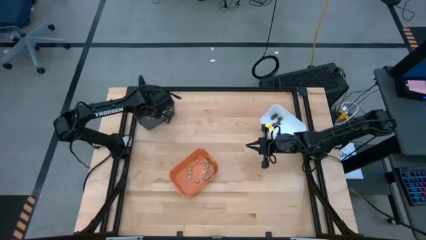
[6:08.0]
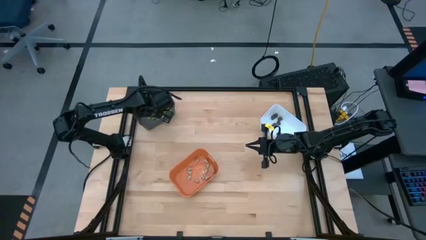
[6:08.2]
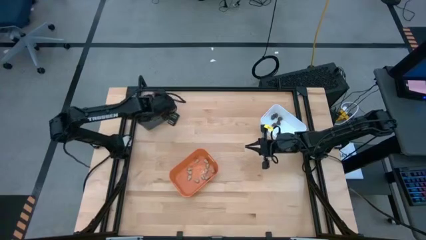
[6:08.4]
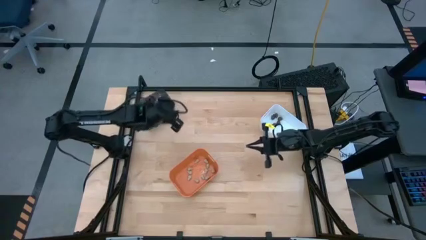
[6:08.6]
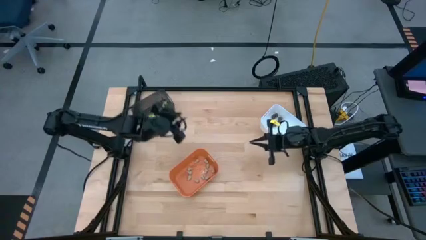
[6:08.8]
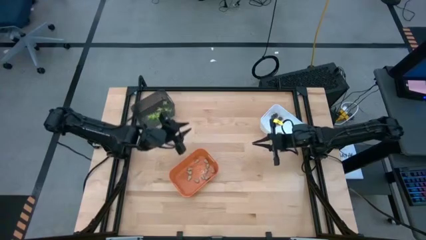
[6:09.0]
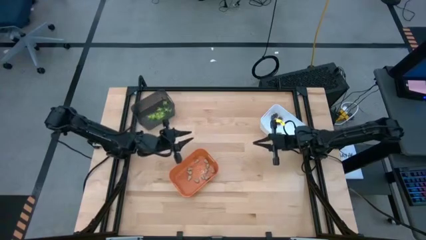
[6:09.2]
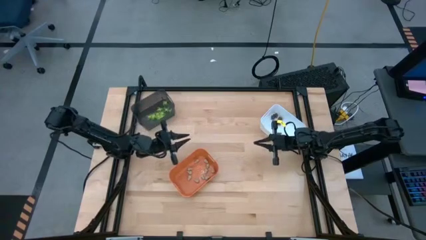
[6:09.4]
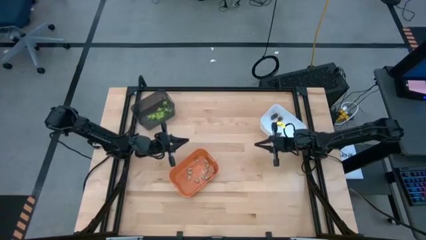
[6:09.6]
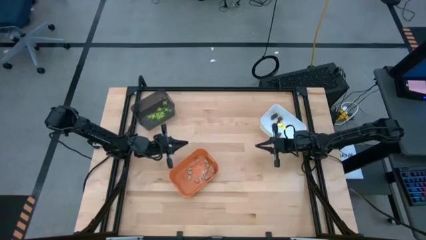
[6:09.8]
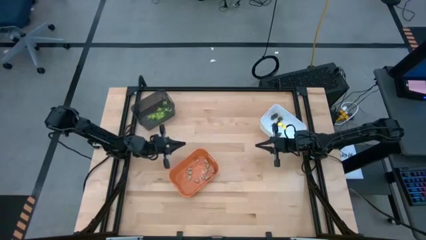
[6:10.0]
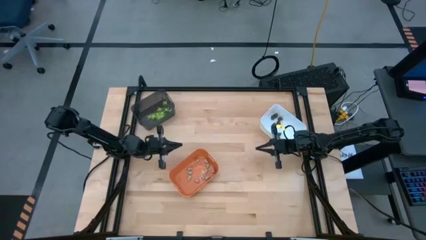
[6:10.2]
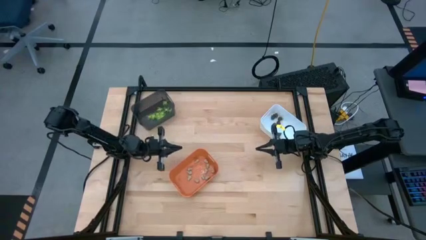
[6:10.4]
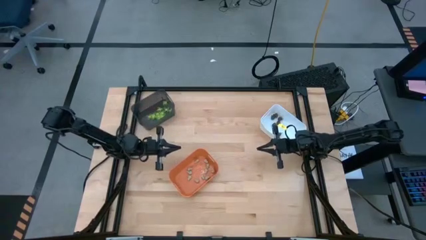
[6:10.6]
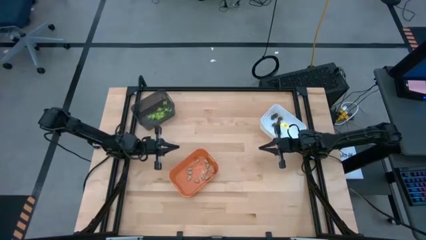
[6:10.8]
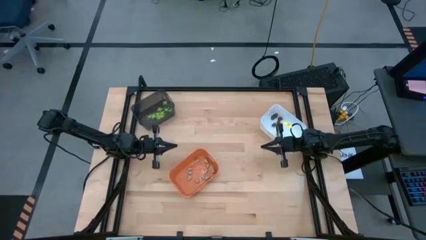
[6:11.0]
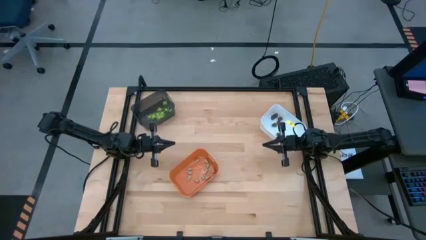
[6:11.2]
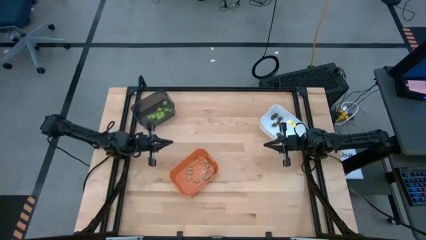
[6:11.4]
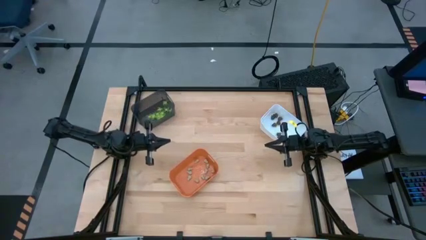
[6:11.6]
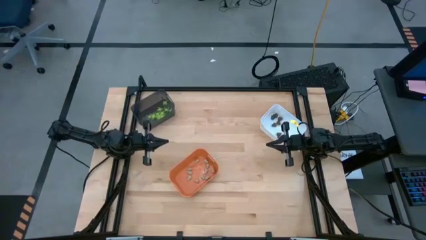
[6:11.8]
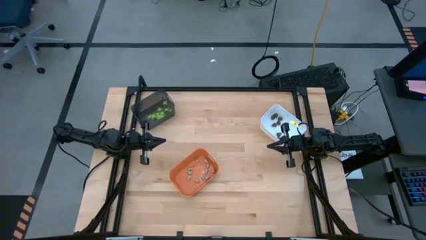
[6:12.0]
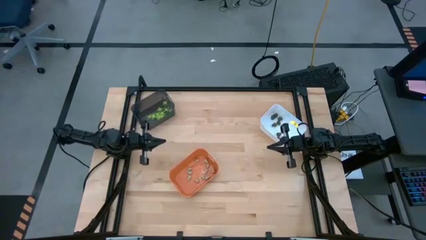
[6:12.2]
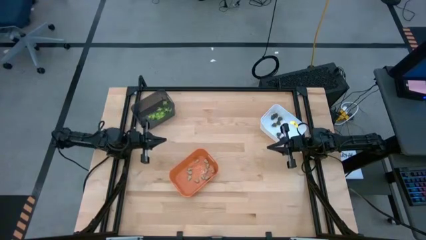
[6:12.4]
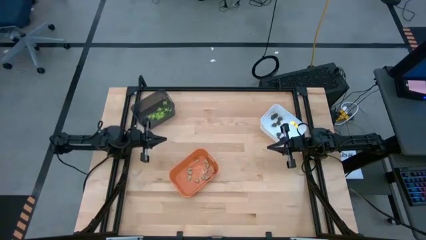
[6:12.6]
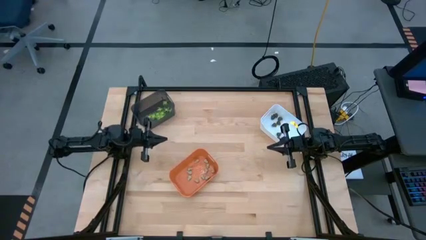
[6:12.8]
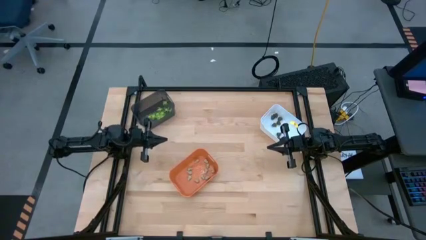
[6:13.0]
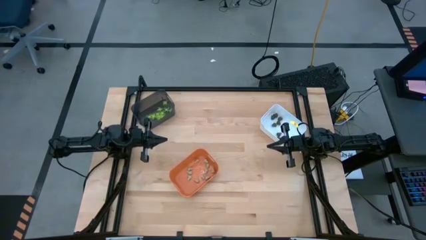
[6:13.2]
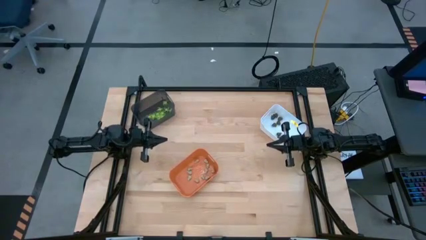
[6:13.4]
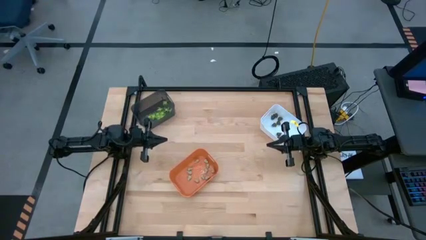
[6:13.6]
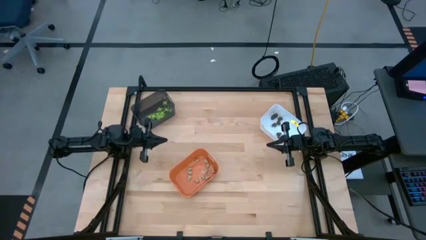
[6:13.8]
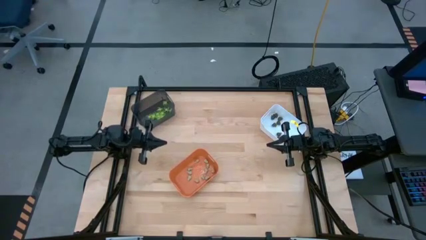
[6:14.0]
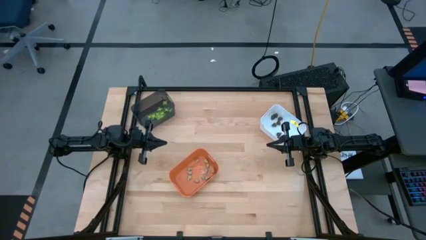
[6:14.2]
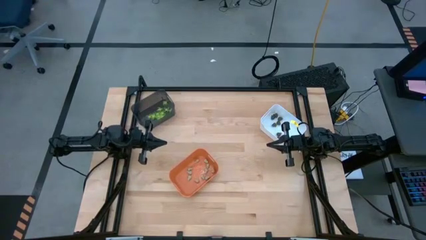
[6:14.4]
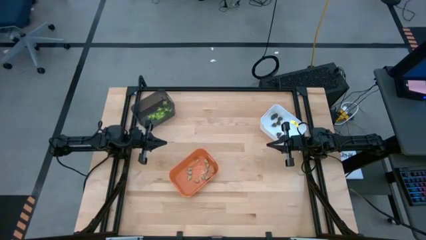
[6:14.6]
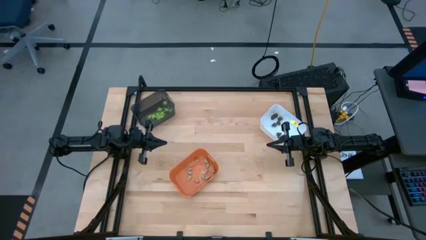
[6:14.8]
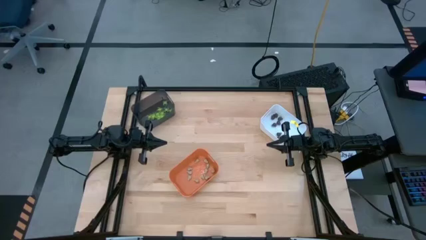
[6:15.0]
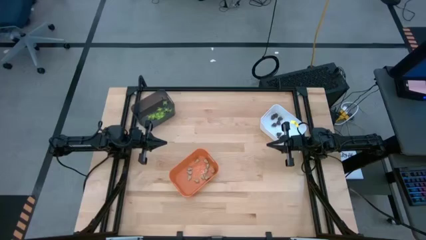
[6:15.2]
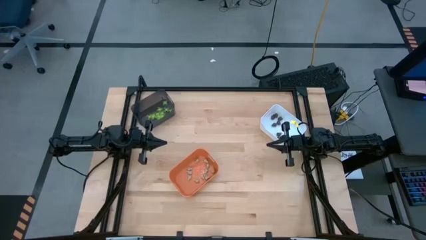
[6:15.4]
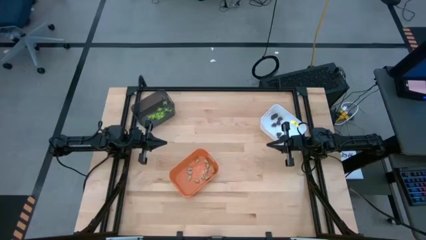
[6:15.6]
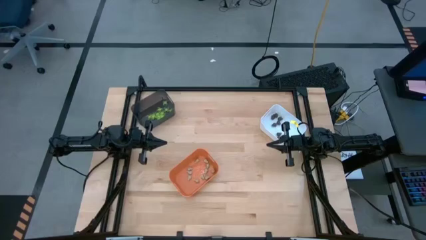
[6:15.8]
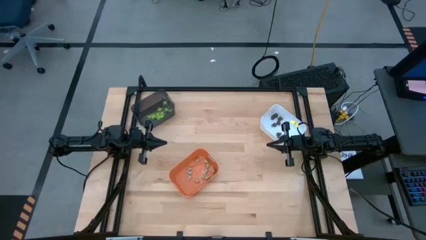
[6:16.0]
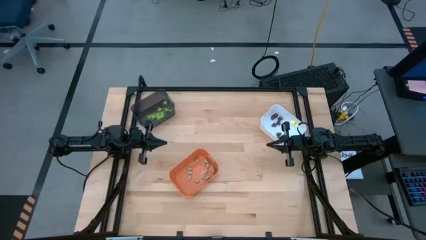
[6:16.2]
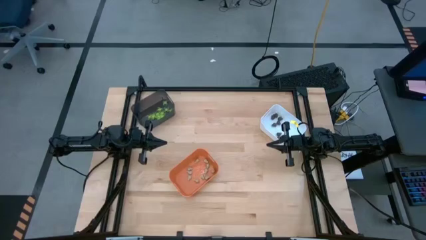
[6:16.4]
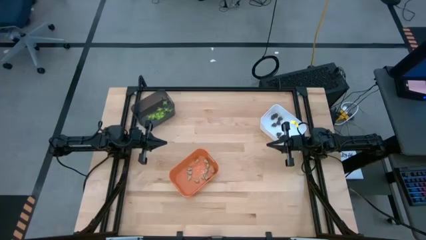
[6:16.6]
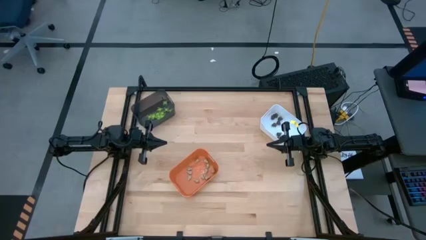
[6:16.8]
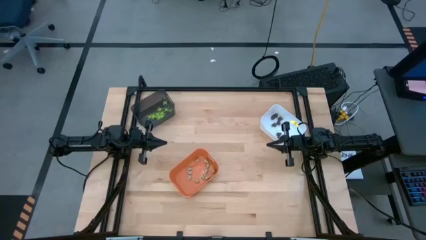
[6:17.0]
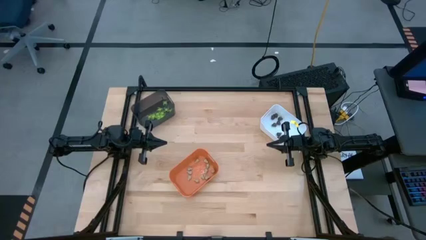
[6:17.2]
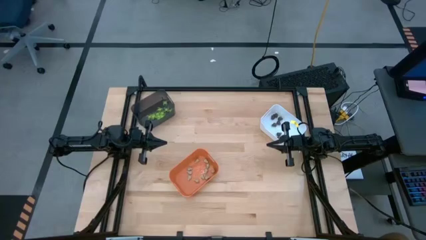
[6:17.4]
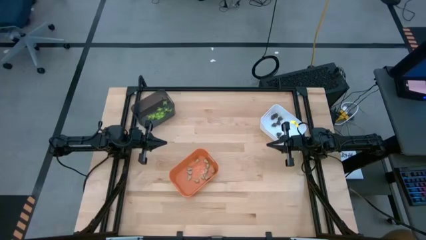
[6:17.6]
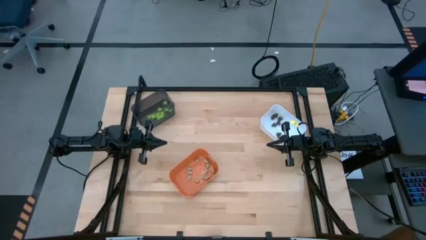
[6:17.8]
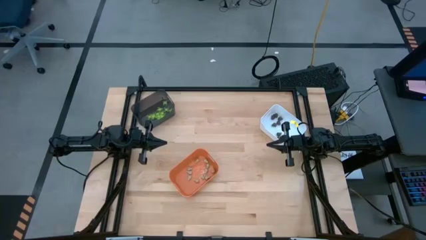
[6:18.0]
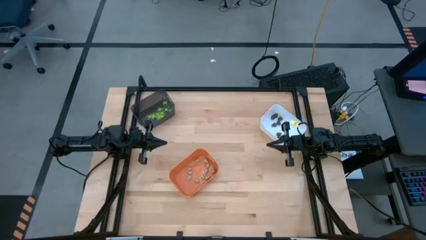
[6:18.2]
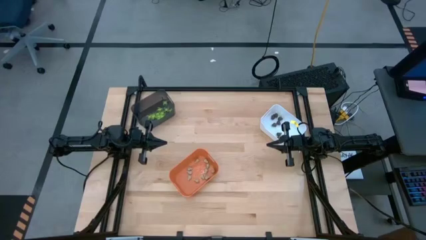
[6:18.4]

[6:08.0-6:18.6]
Task: Sort Halloween decoration
Return to Home Position
